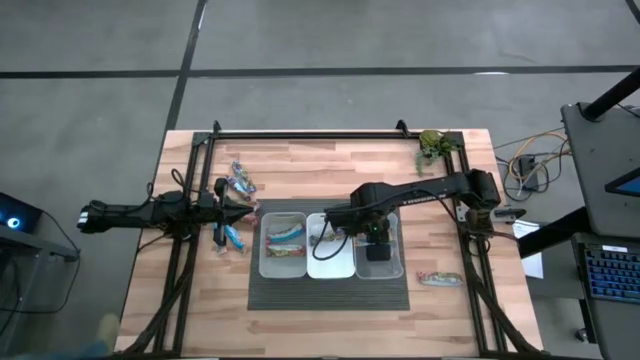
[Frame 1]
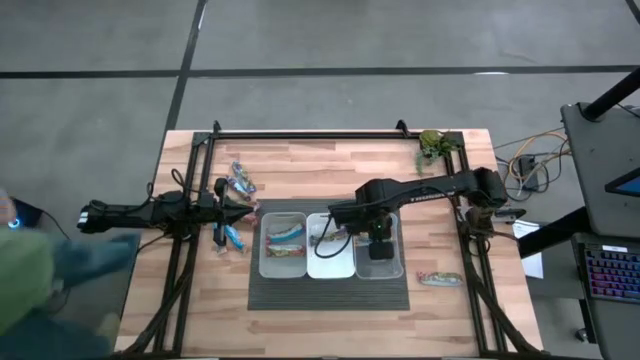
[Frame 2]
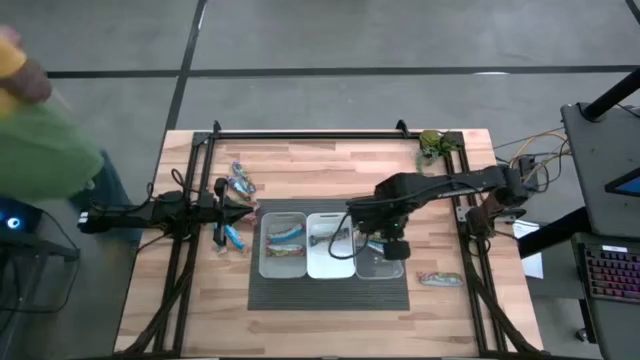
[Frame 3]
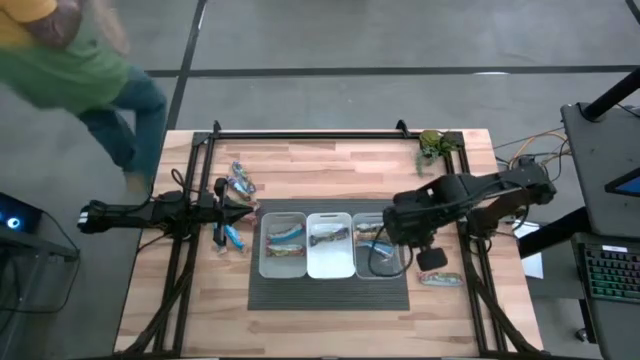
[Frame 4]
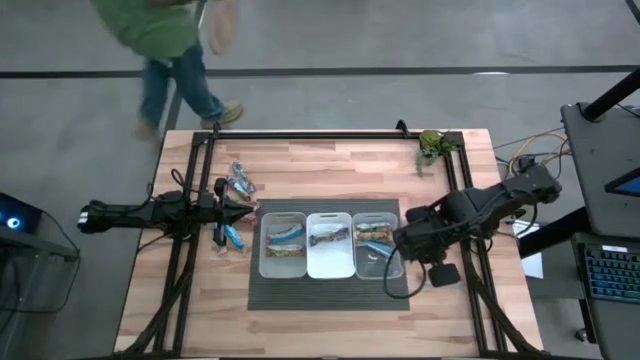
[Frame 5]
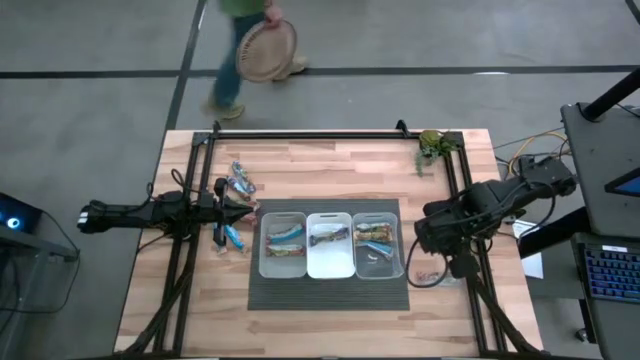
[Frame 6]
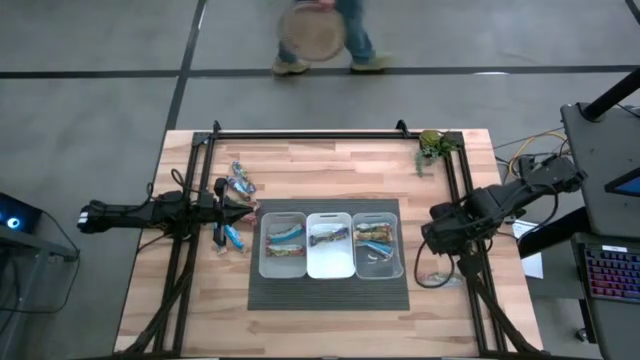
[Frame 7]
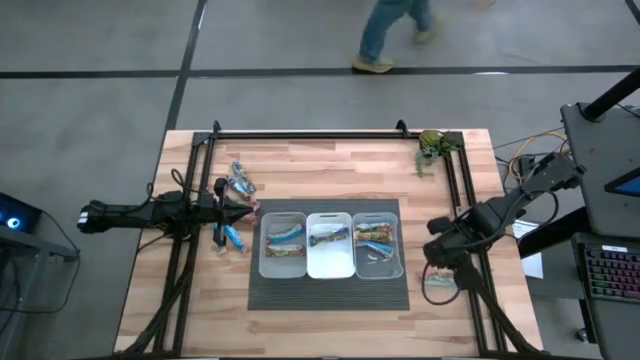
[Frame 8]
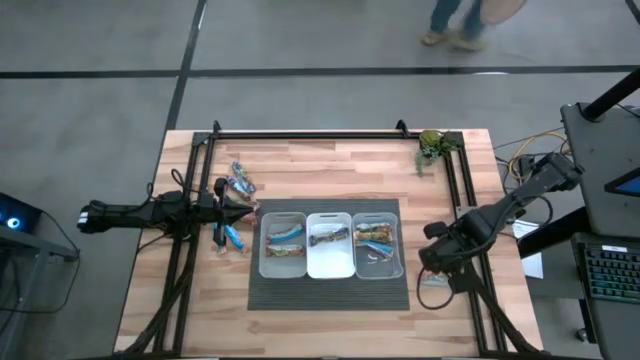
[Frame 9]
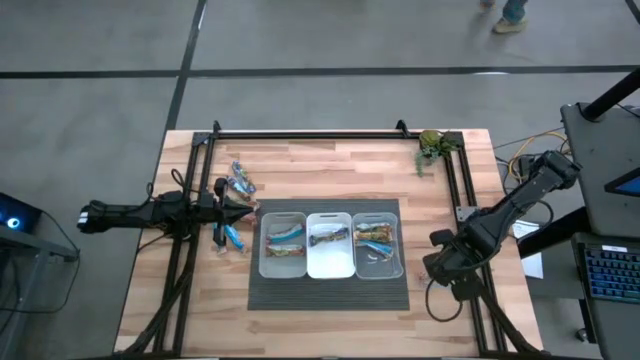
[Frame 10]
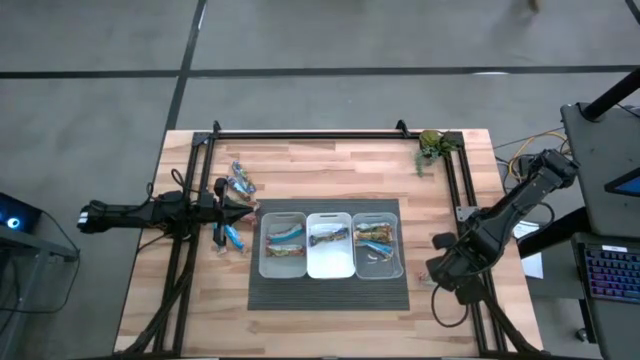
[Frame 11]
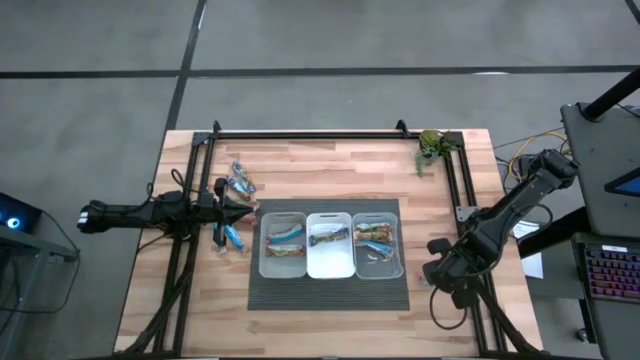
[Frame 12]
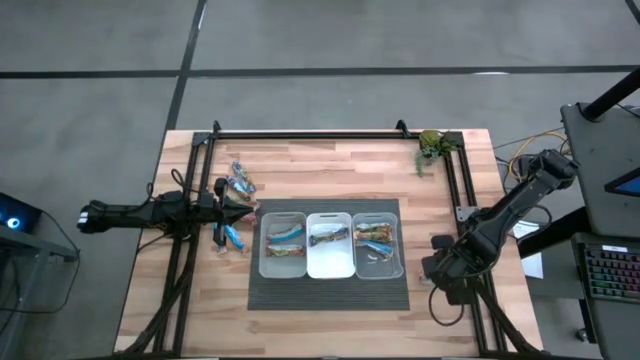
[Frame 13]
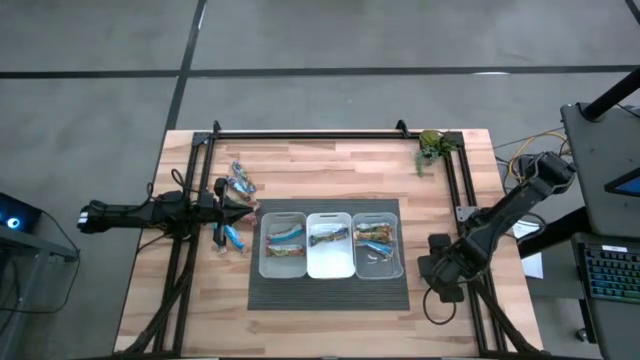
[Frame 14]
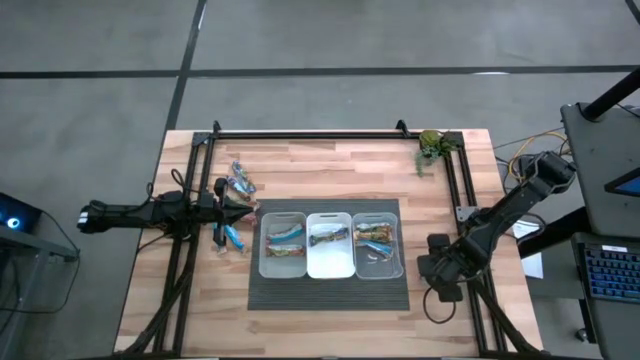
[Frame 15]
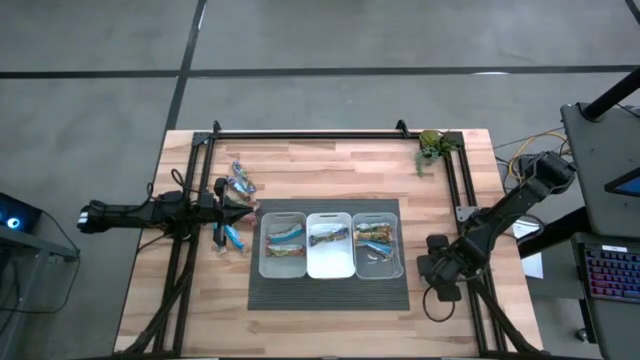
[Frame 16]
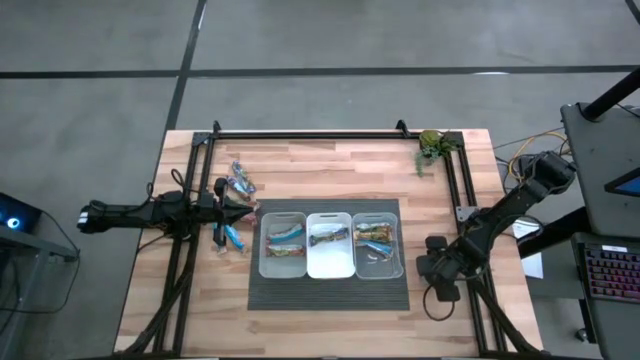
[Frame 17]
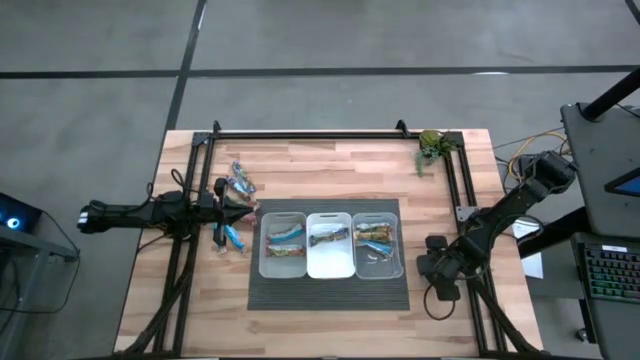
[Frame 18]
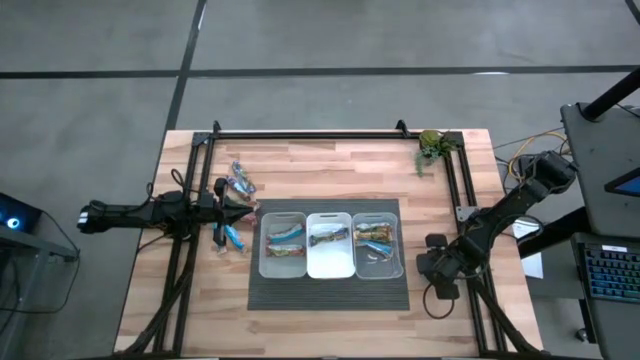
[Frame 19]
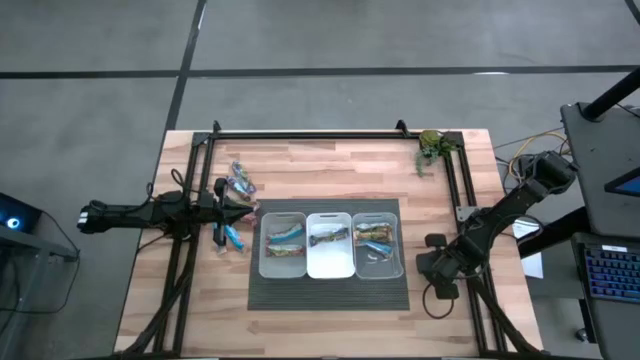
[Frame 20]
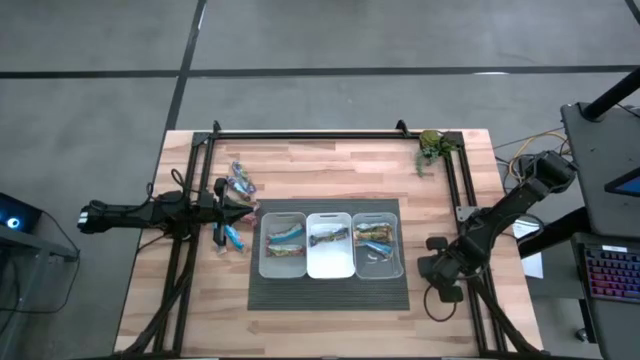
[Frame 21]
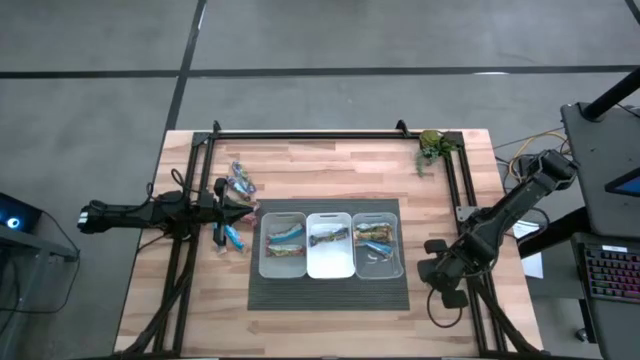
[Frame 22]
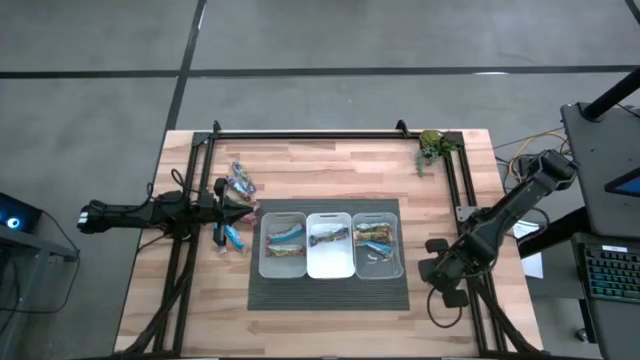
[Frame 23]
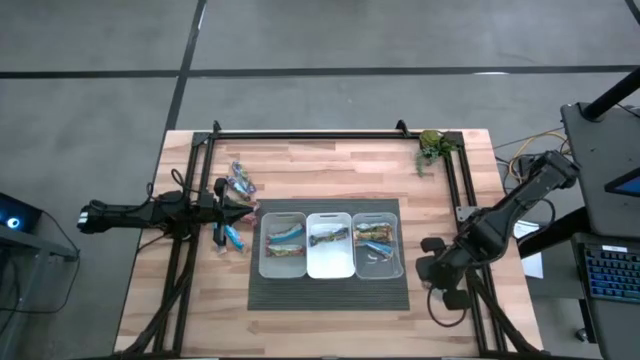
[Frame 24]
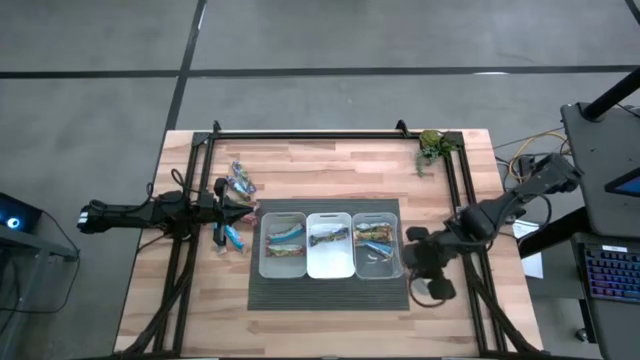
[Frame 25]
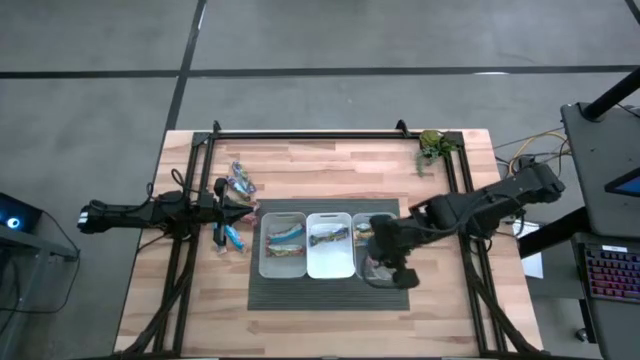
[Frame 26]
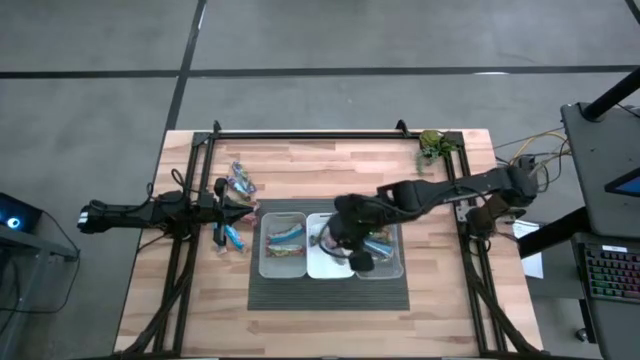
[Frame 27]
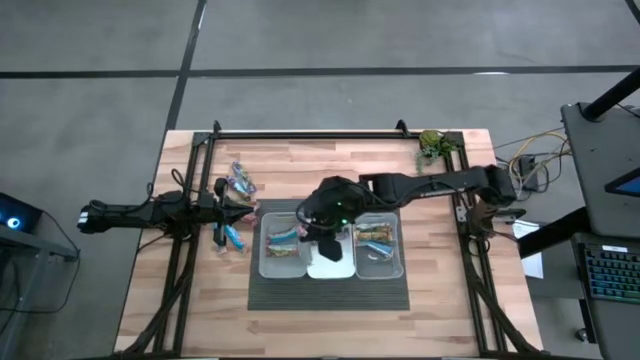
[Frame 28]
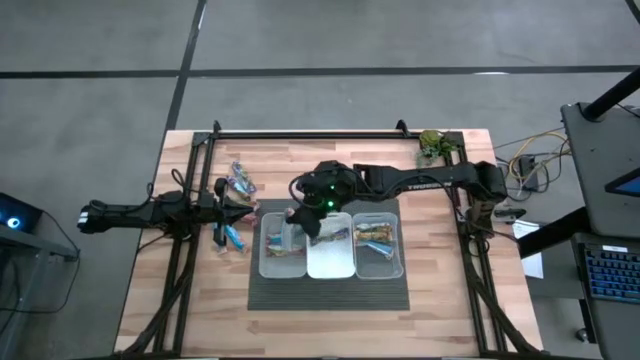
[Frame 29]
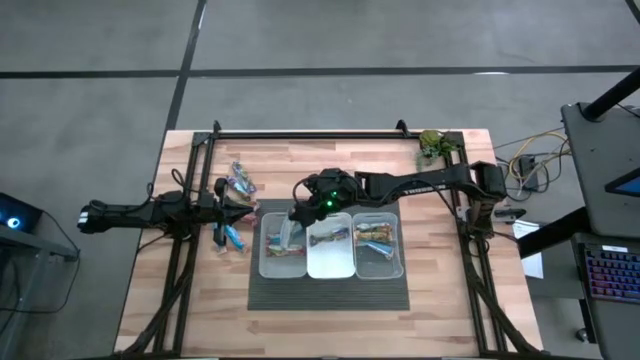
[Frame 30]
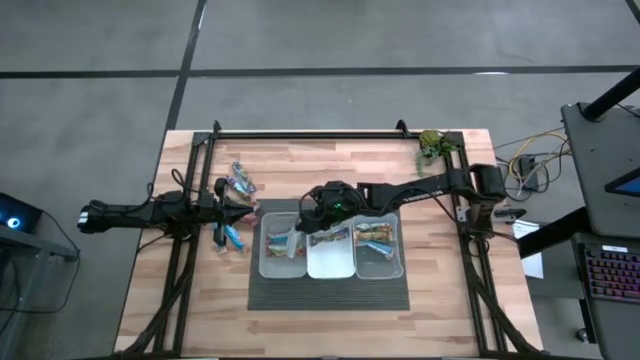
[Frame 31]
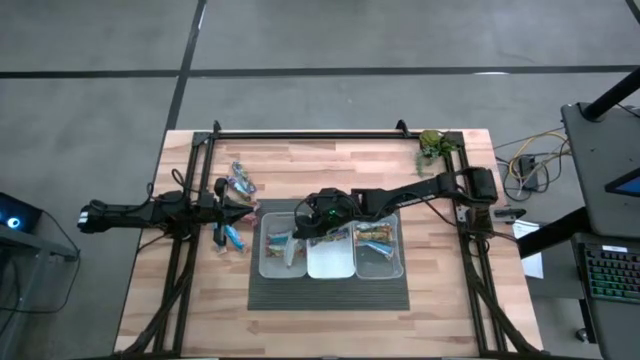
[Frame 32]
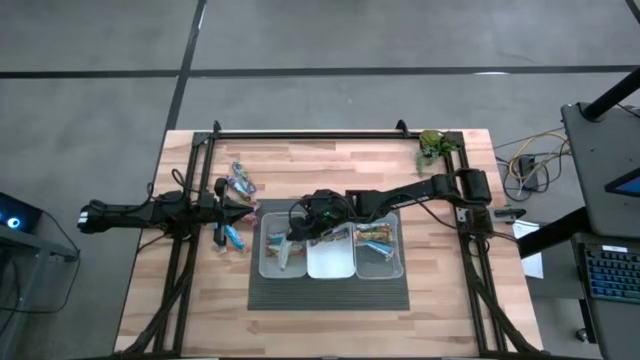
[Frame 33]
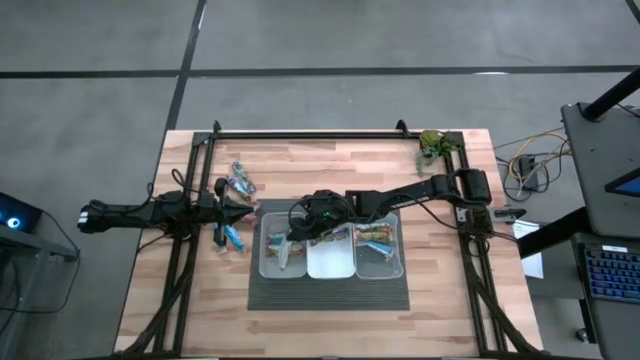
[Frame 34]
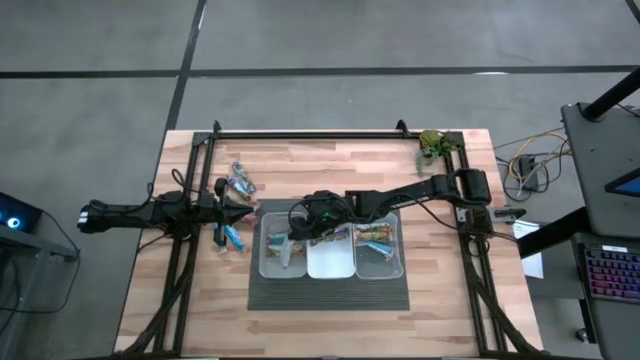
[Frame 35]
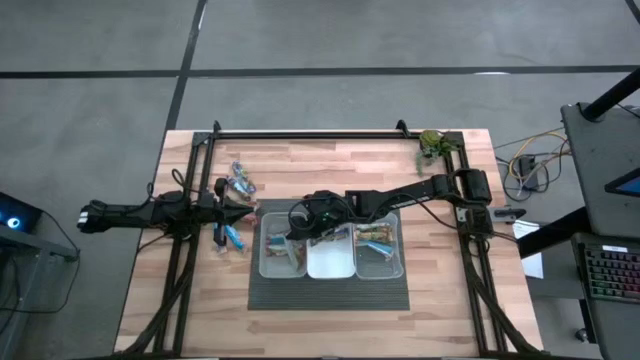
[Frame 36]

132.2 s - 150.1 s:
Task: Pick and place Granola Bars by type
Put the bottom red granola bar into the gray bin

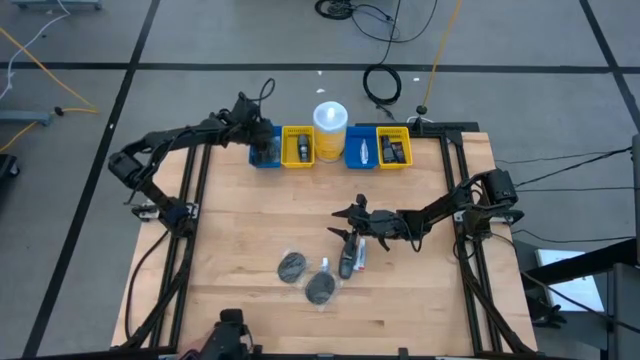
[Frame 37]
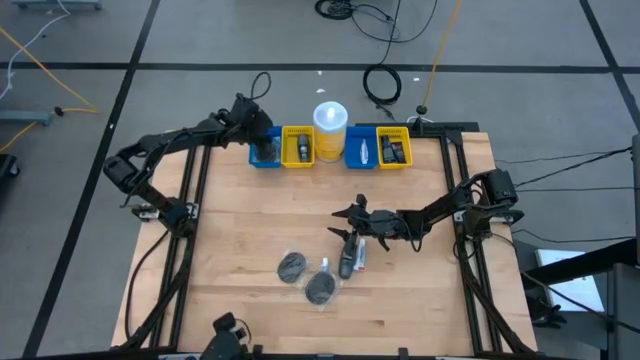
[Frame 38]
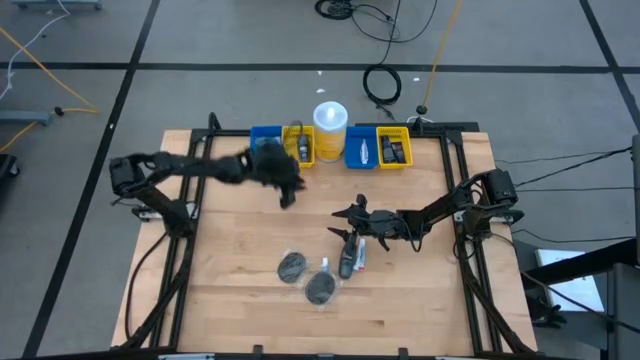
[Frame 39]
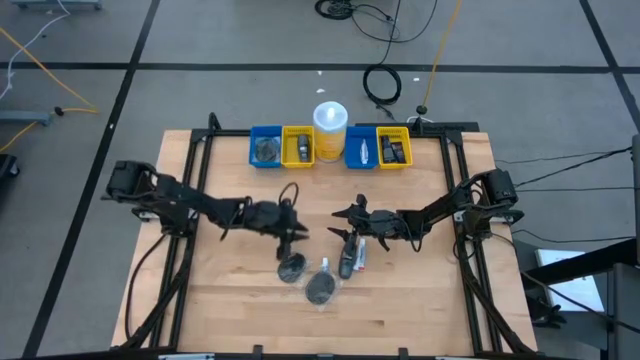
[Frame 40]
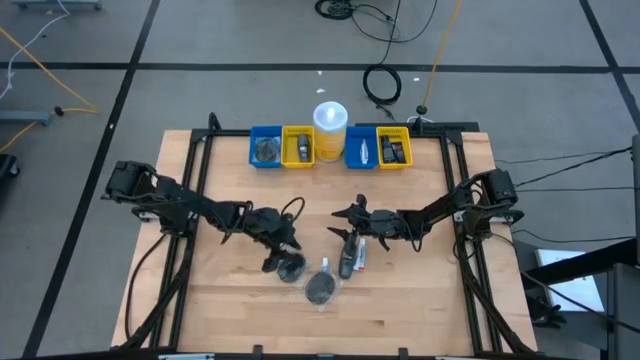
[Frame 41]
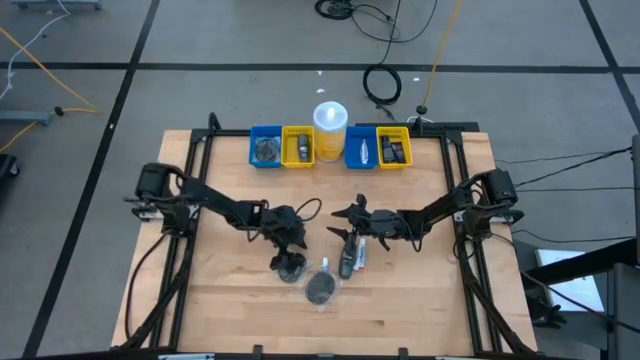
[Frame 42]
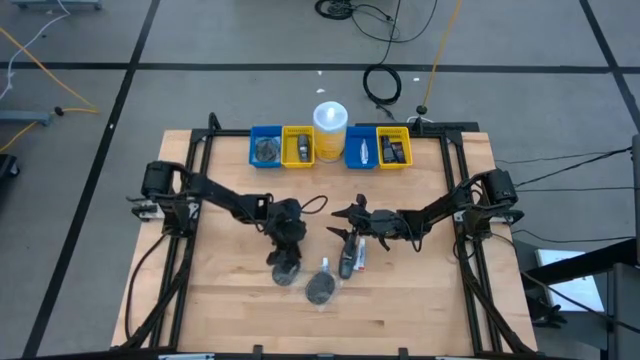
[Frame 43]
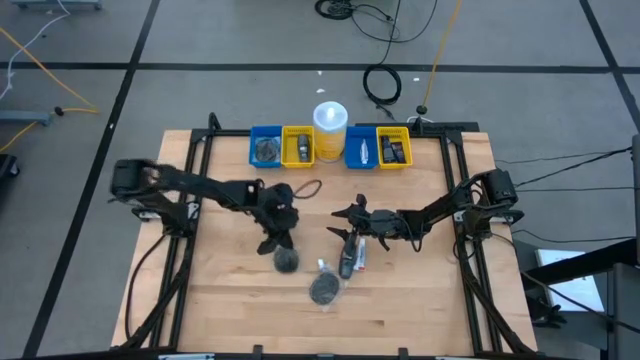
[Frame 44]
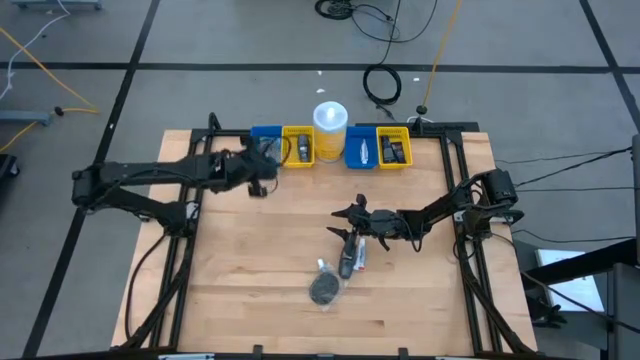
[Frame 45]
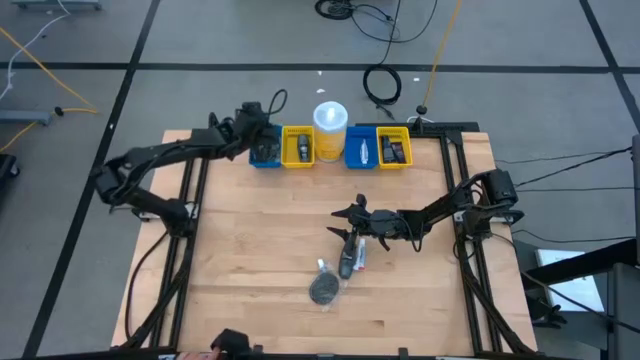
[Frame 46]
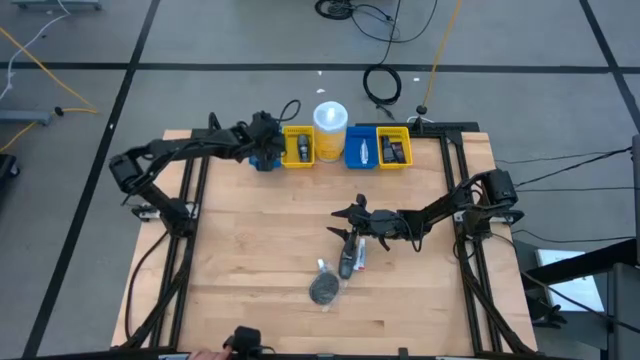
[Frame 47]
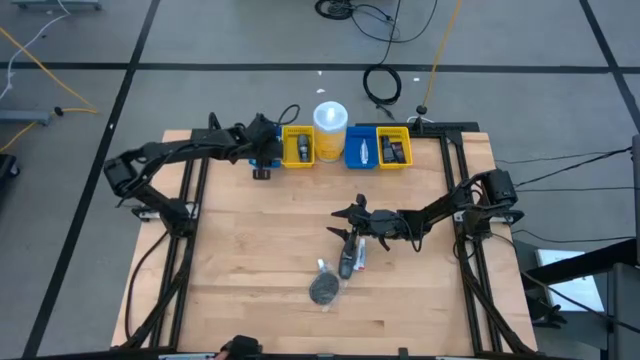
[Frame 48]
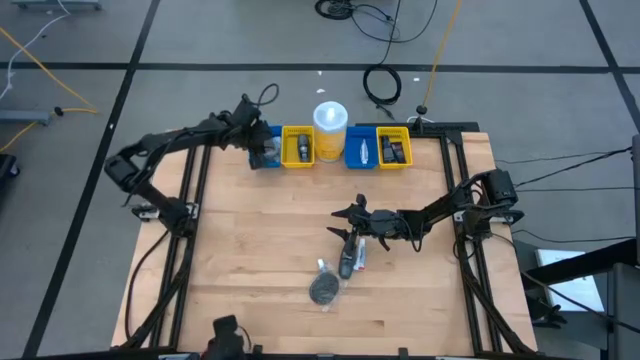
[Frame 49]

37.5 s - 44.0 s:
Task: Pick & Place Travel size toiletries
Put the black hairbrush into the left blue bin
